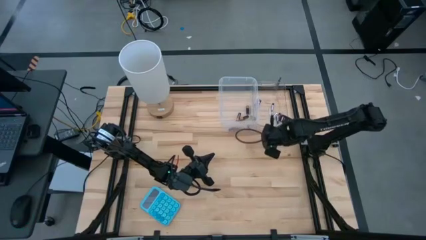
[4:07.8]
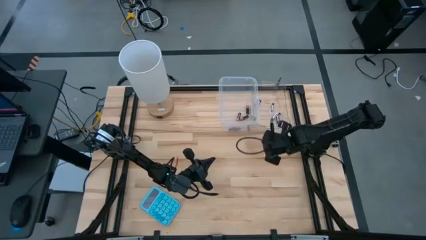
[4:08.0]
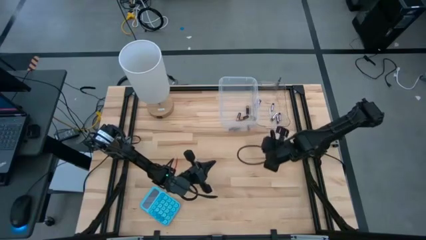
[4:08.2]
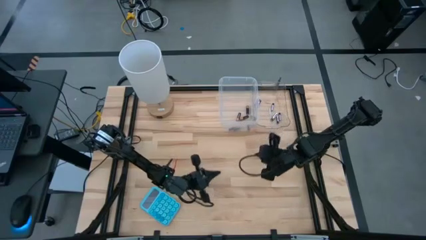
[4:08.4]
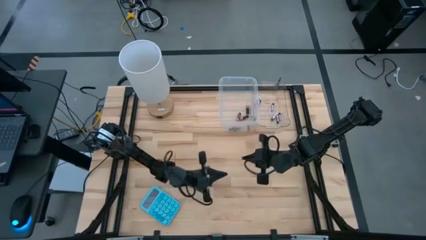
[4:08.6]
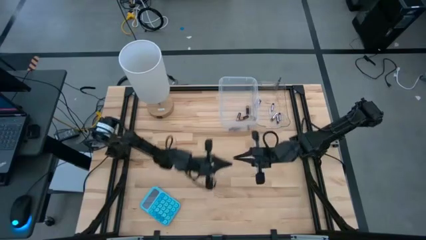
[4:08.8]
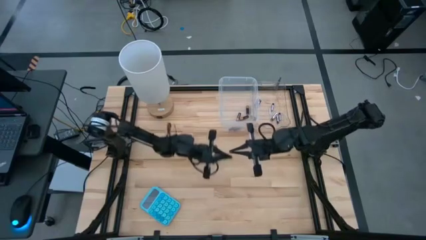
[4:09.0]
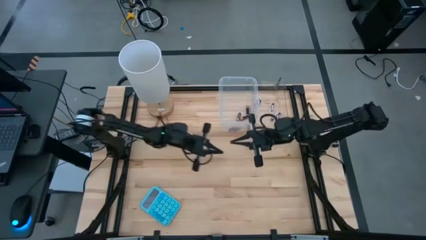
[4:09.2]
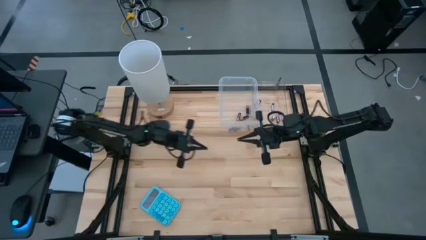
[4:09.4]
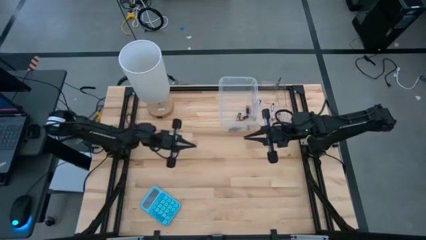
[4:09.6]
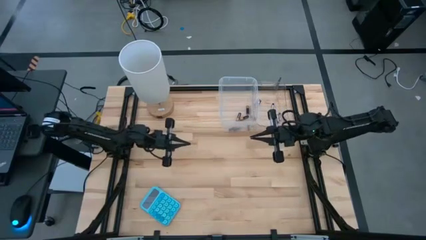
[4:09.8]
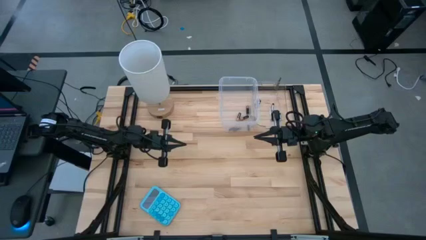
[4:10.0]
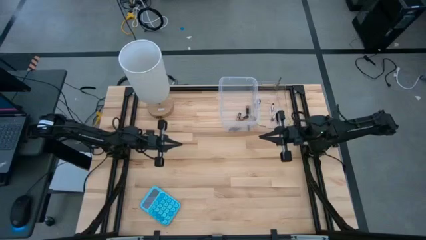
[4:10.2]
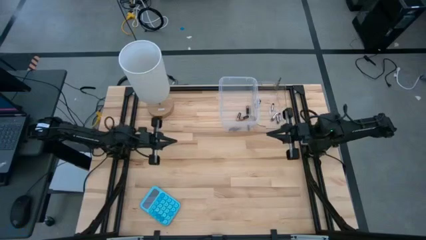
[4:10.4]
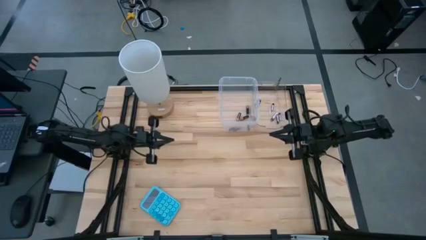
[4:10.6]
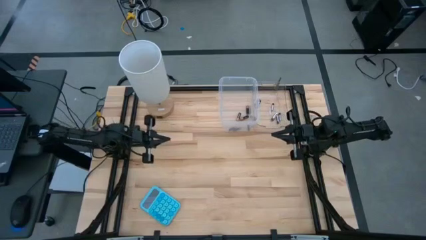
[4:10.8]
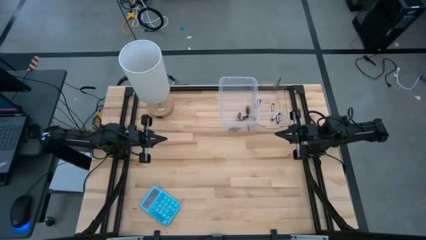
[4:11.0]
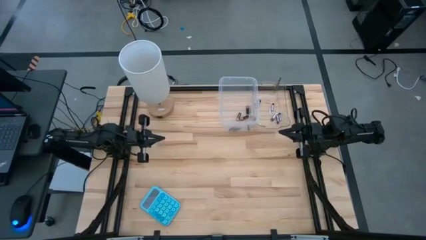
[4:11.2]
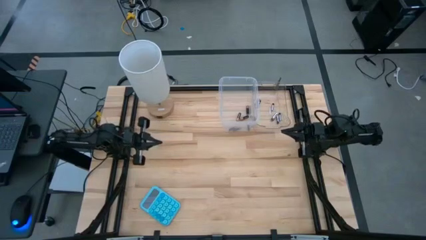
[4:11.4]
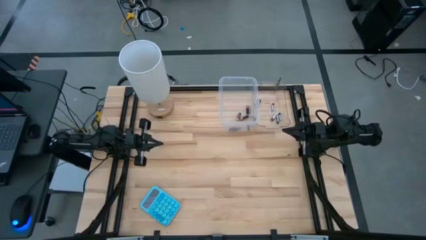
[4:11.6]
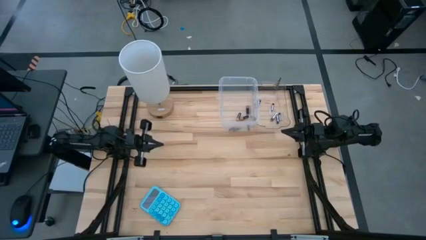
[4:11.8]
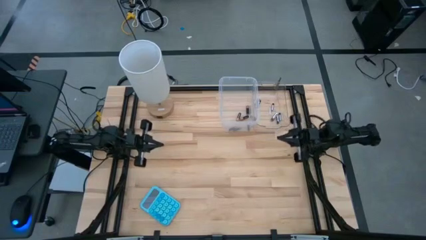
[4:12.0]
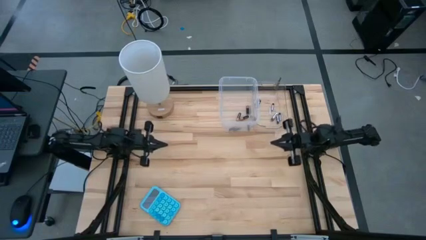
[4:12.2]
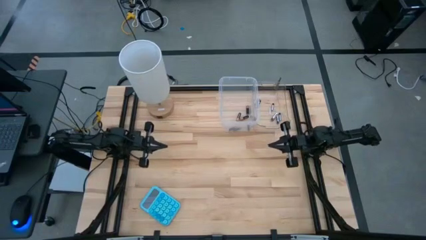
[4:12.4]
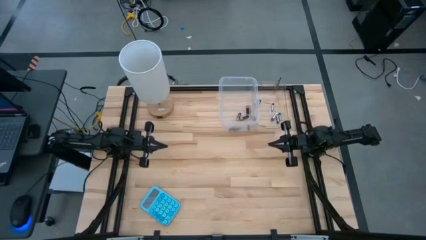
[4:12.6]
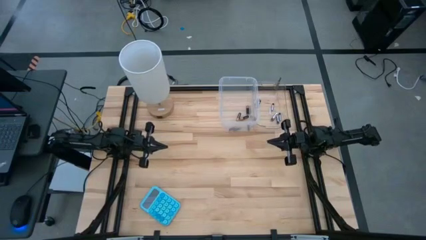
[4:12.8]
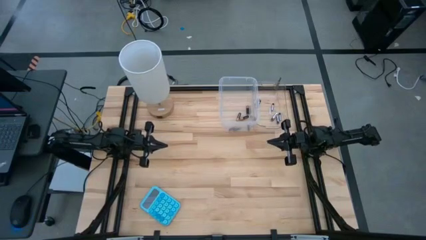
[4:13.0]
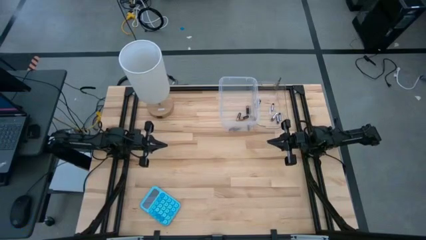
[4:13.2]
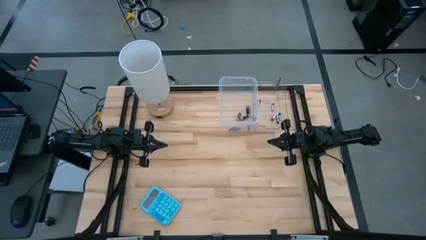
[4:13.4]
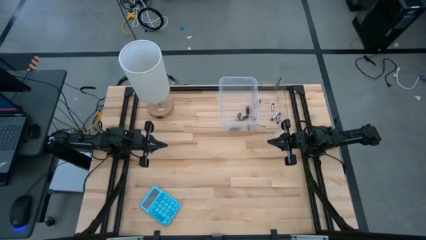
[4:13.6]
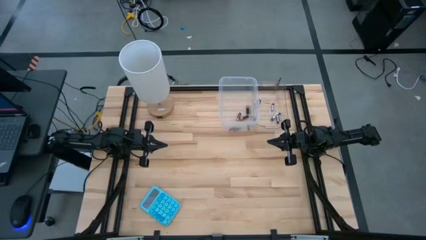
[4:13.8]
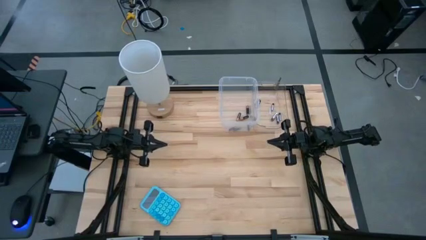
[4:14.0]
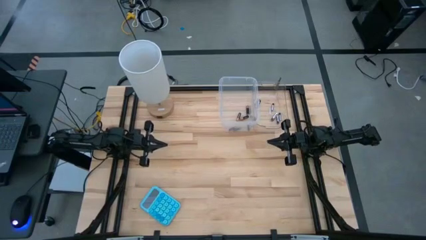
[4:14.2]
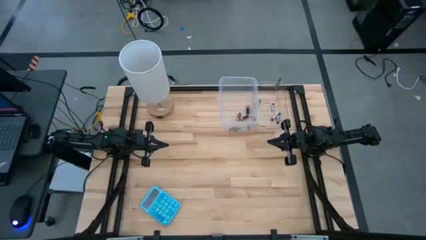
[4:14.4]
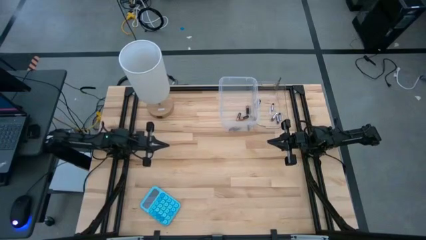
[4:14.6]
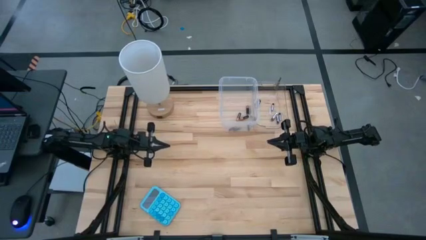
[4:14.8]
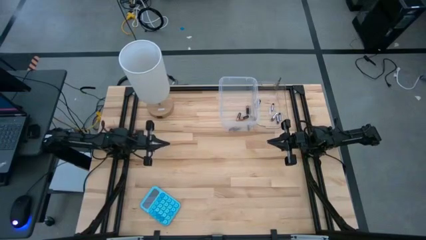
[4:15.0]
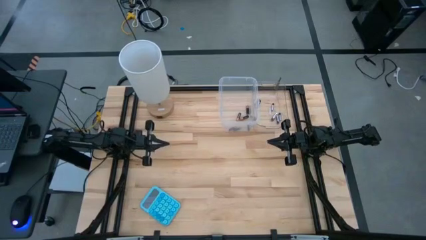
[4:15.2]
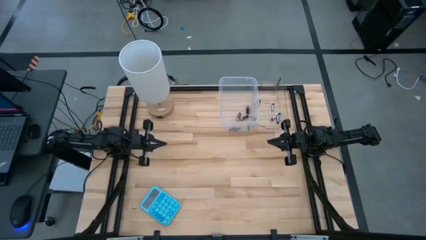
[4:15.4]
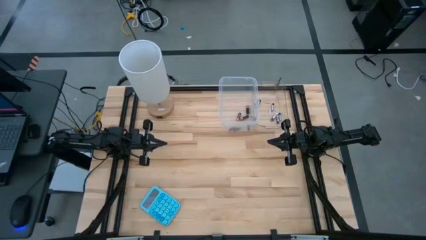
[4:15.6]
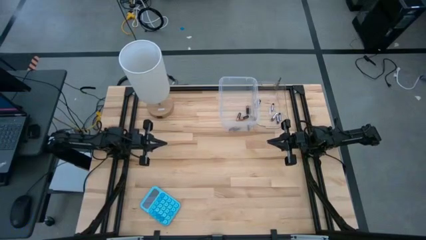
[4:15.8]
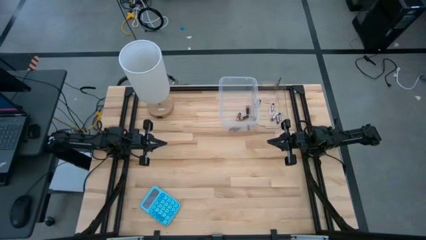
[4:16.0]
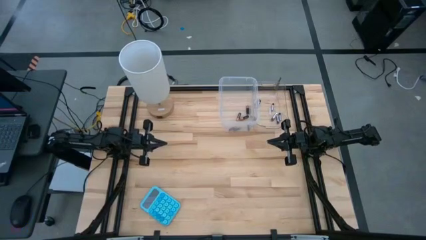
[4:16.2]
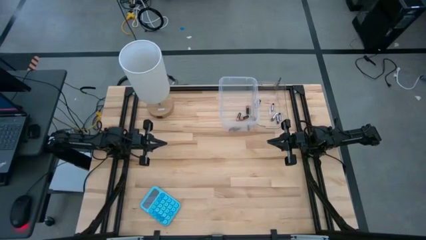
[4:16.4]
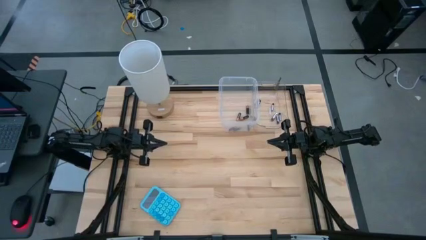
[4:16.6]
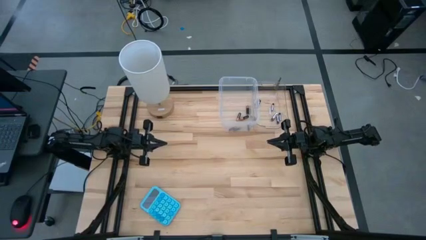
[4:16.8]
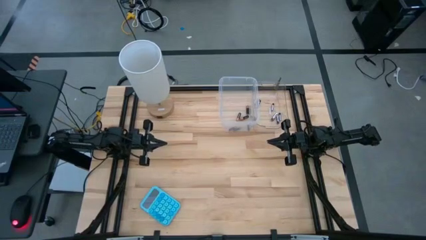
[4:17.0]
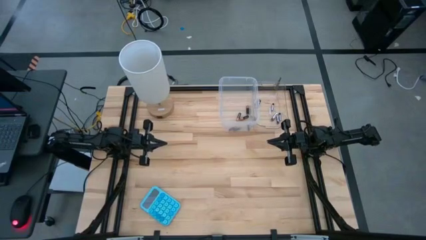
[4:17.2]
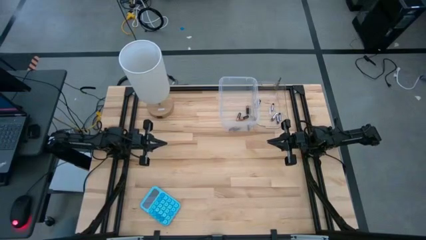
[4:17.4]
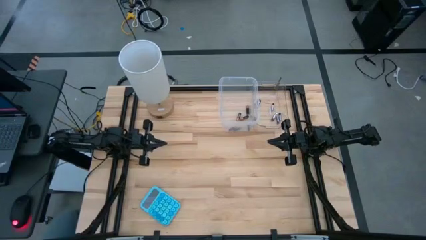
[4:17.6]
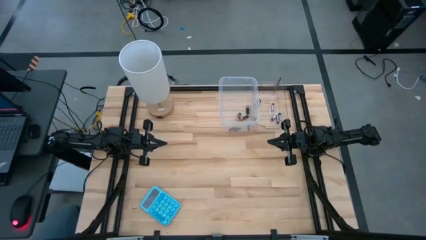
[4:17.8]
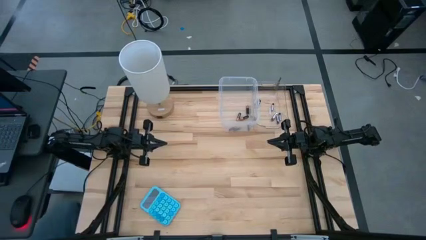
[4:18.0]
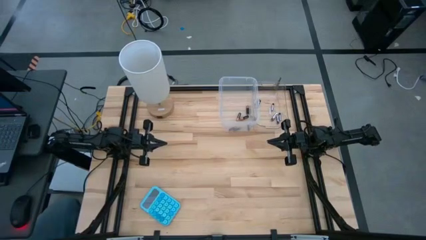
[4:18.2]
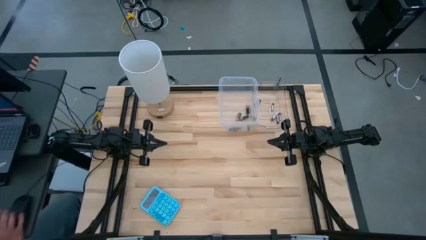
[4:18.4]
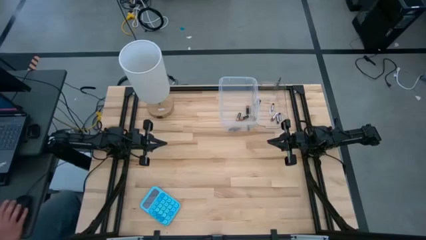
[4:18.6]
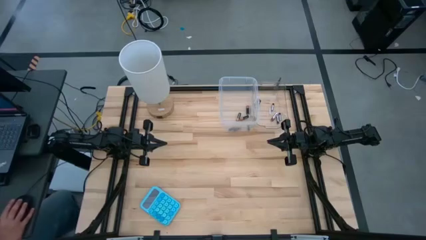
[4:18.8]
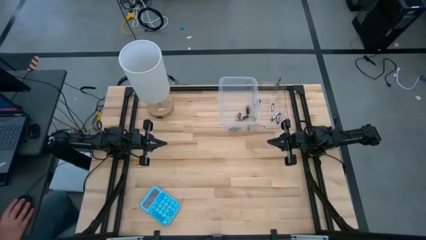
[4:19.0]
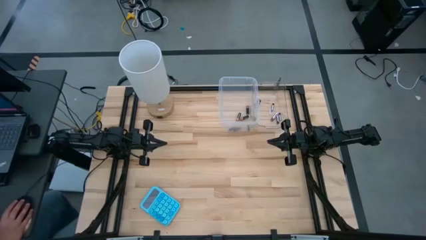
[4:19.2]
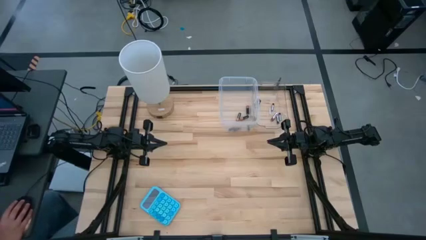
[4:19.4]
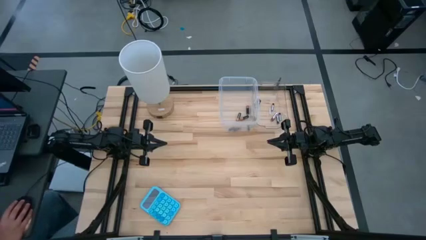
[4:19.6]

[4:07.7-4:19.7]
Task: Sort batteries
Return to Home Position

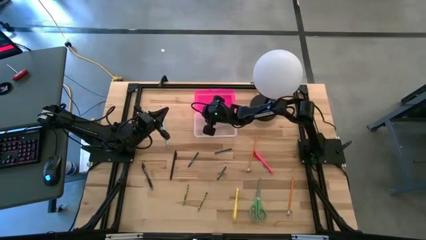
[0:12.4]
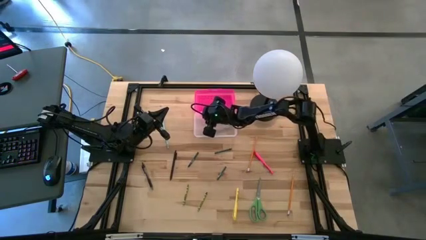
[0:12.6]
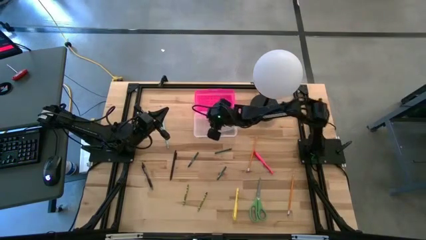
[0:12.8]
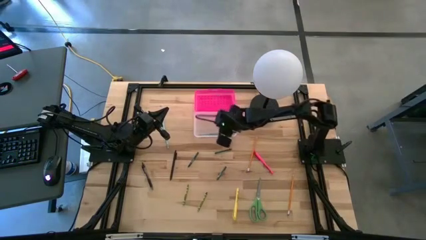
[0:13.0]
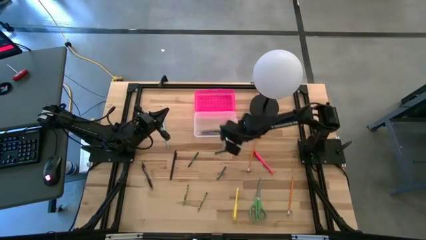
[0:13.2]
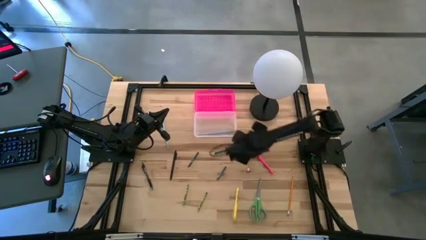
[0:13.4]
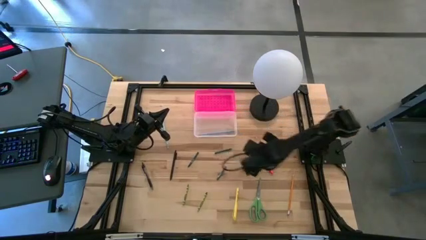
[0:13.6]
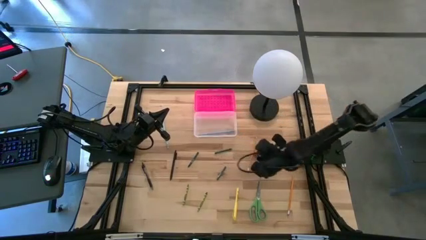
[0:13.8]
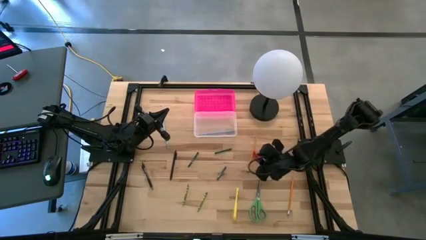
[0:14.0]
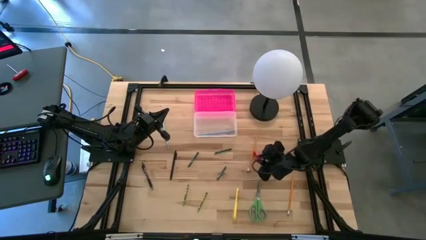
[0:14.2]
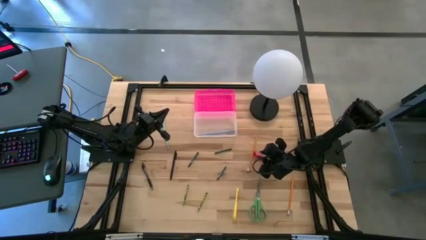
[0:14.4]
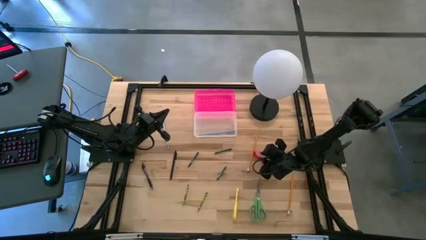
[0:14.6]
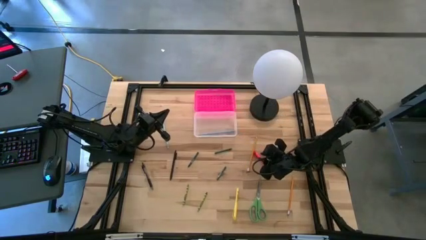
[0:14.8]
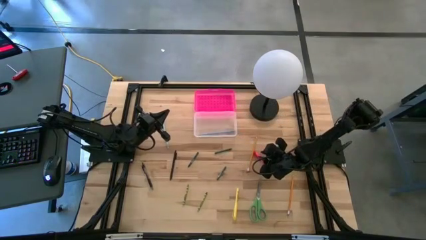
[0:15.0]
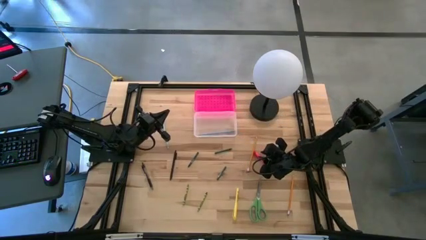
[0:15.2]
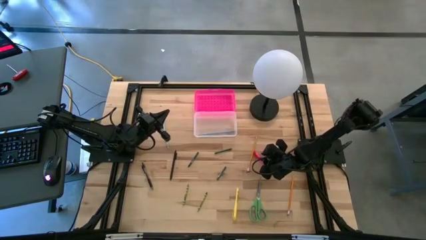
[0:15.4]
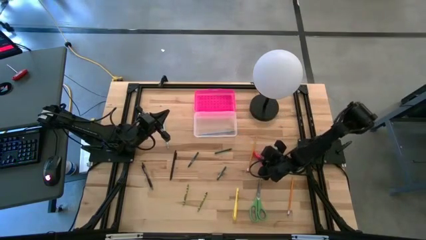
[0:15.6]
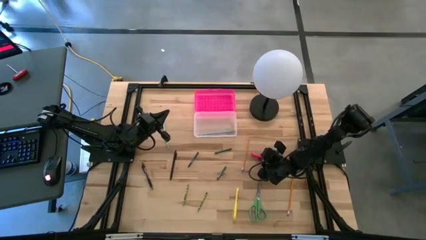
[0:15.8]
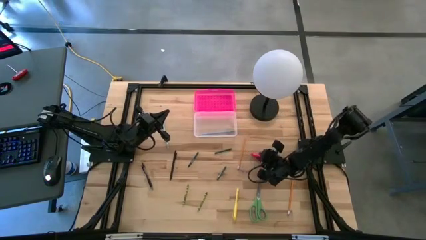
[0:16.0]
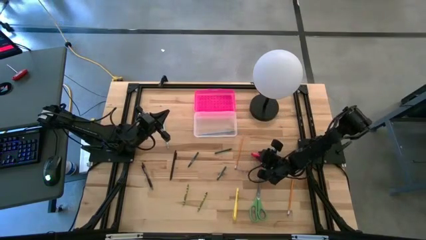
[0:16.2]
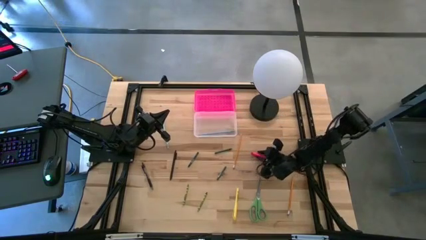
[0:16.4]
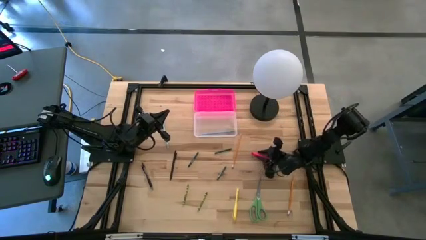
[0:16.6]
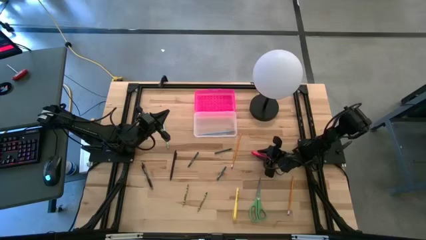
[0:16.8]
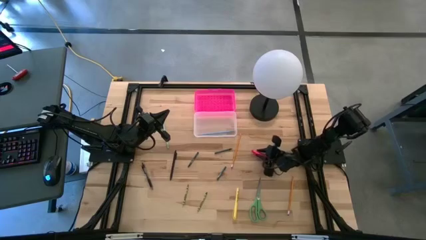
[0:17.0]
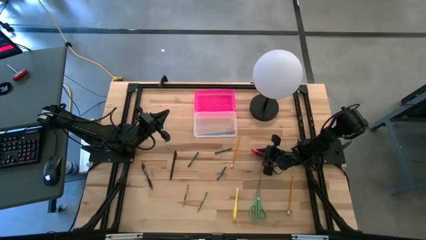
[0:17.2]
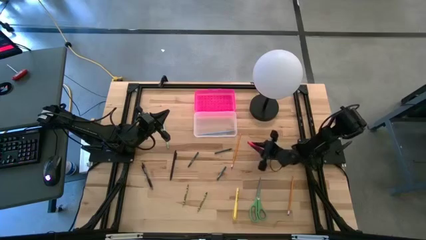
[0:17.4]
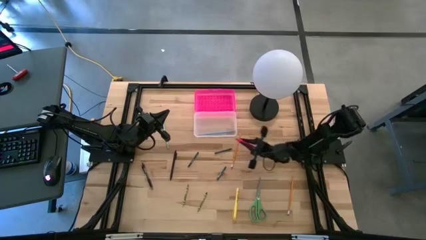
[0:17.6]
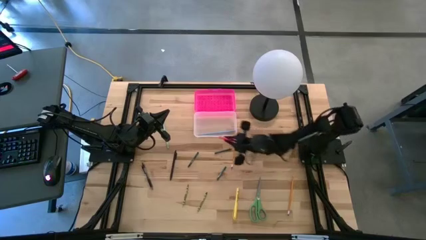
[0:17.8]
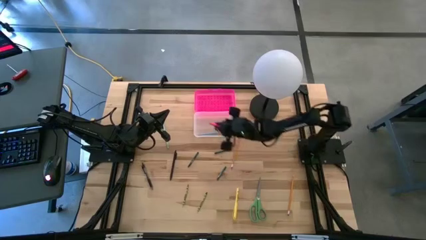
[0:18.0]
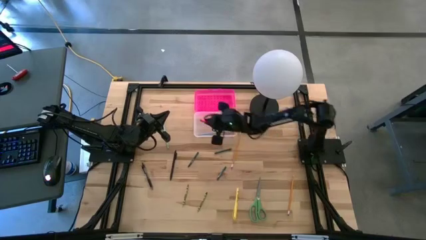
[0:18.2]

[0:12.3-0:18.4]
Task: Pick & place school supplies into a supply box
Put the pink pen into the transparent supply box
